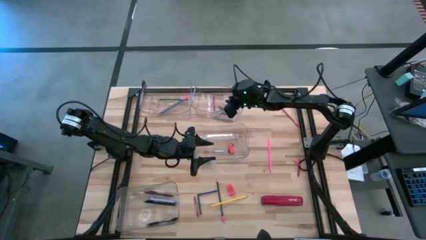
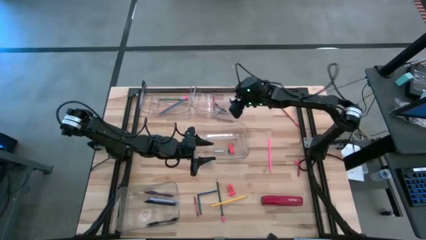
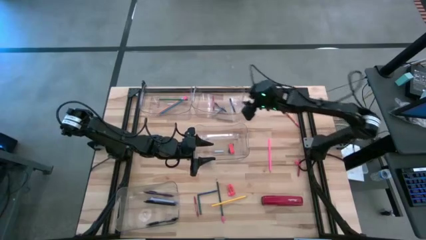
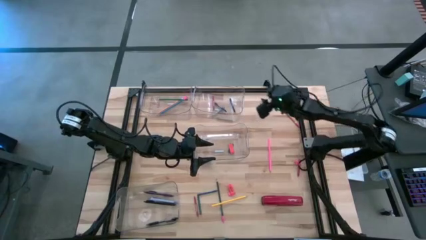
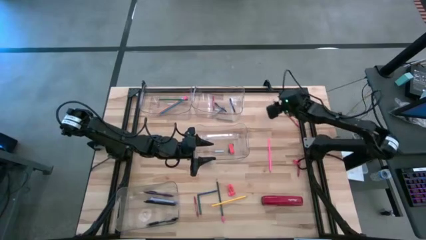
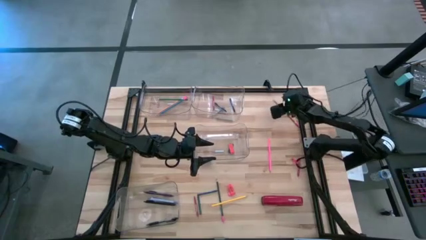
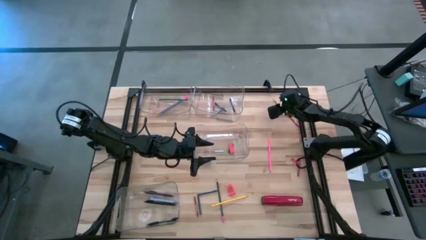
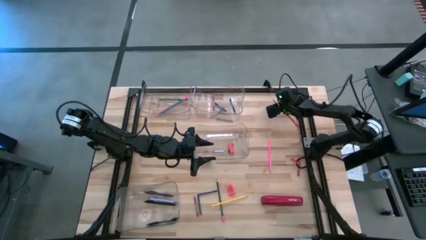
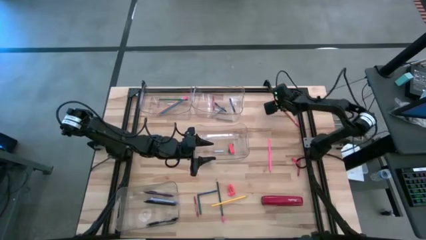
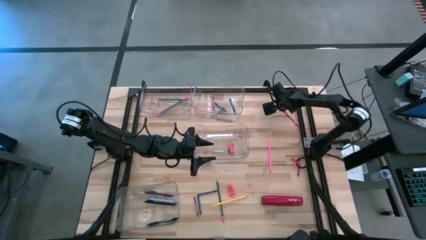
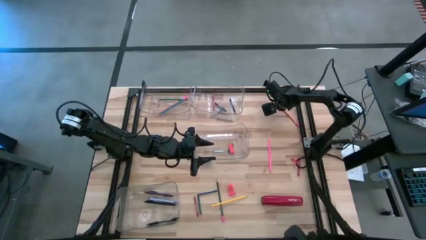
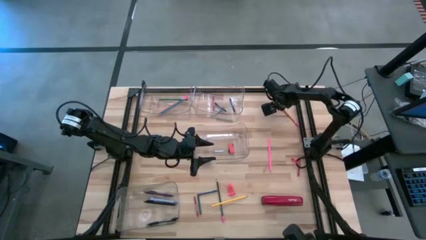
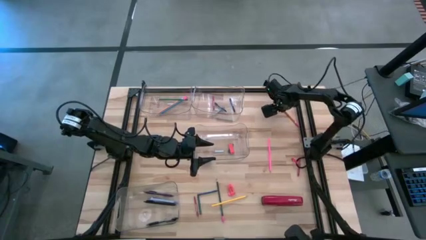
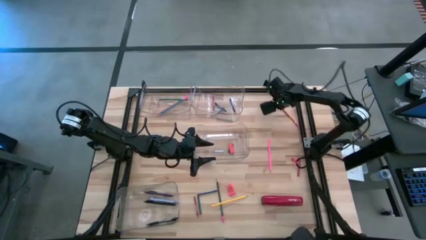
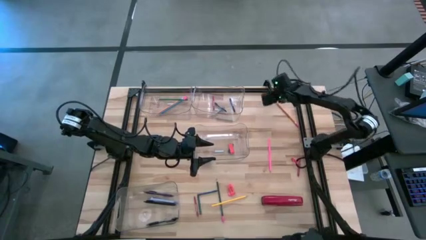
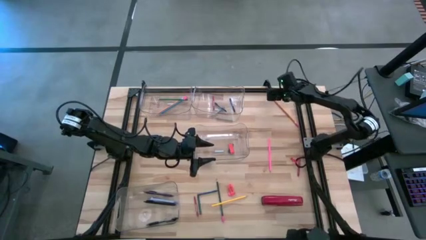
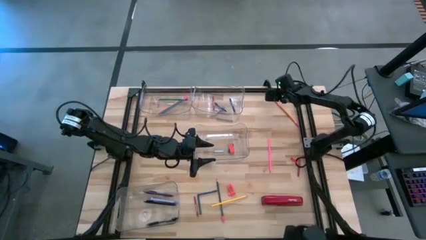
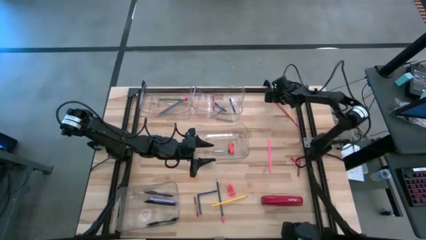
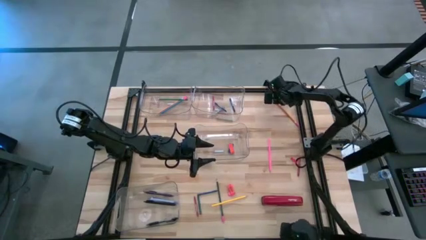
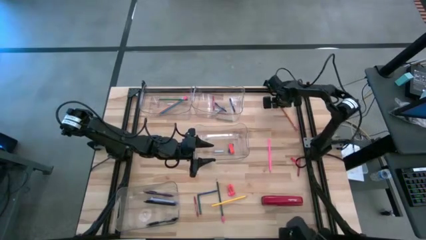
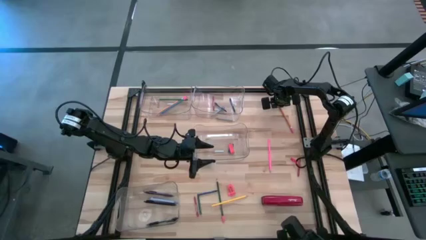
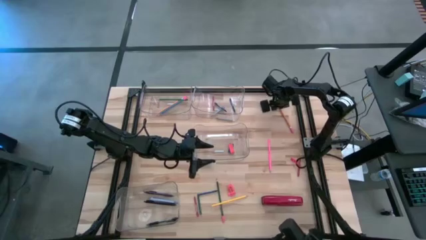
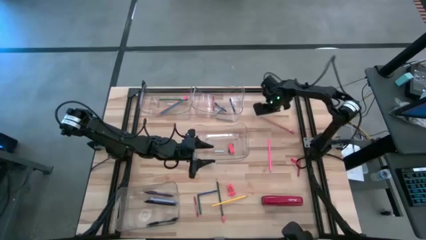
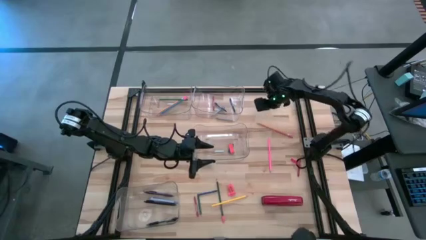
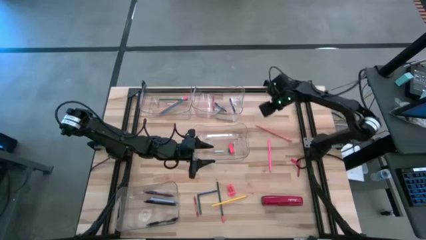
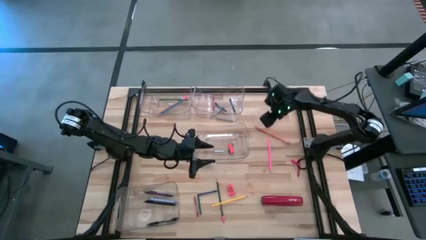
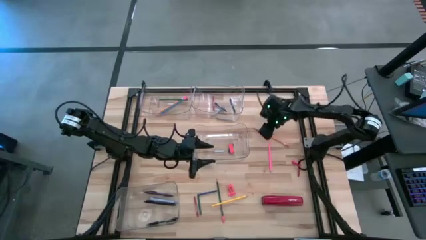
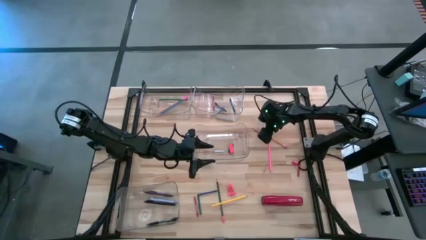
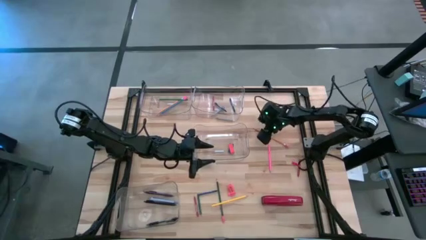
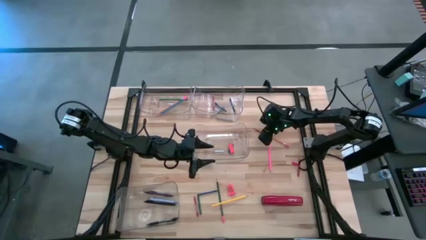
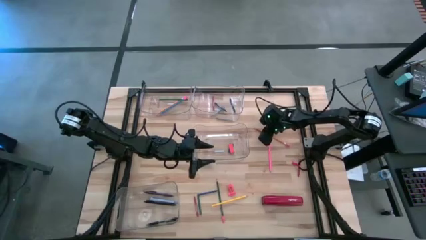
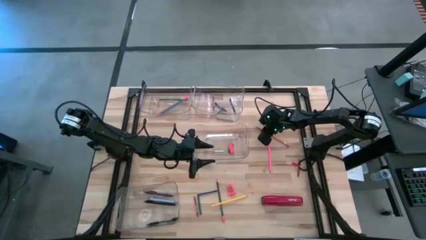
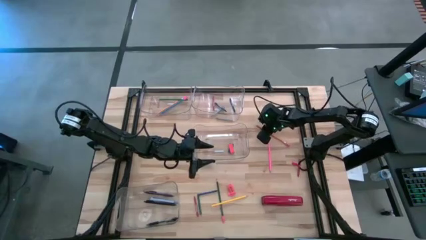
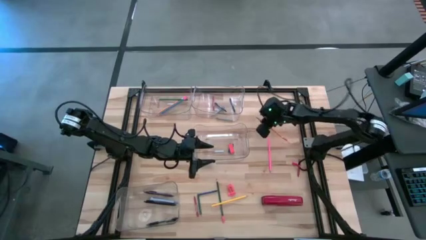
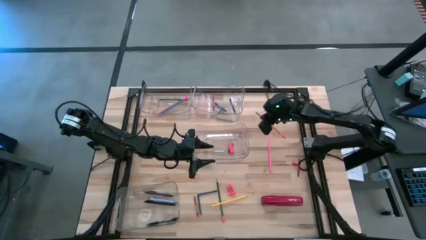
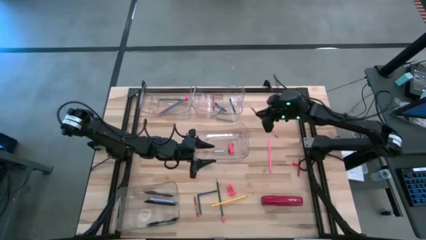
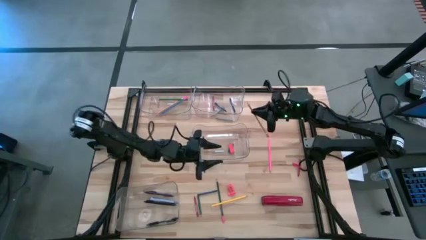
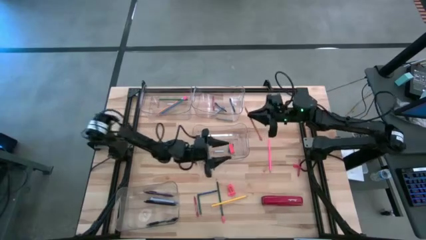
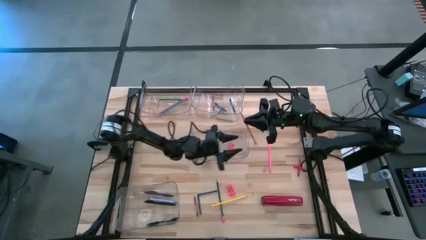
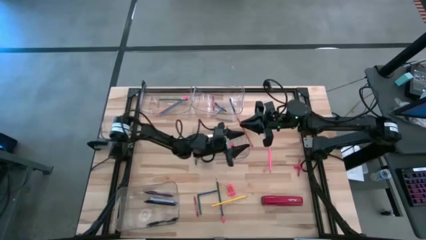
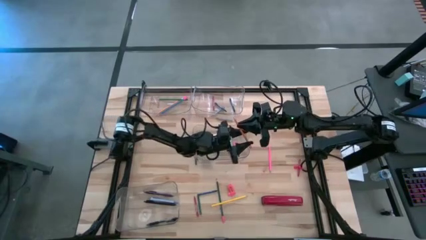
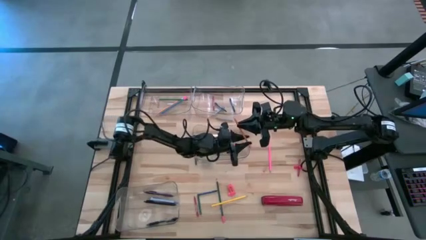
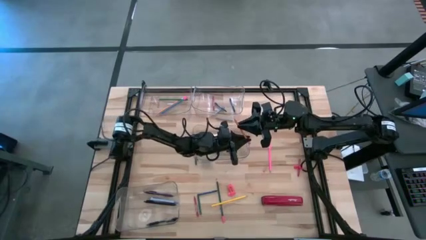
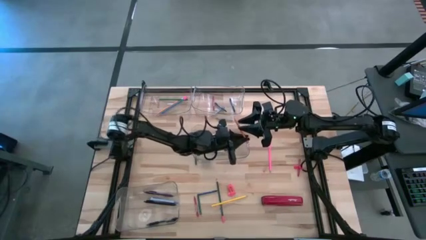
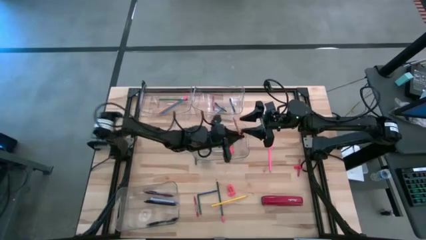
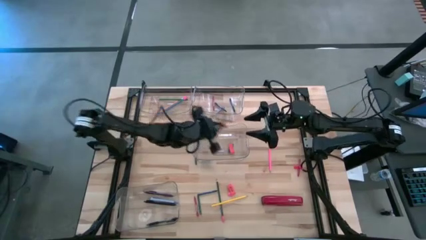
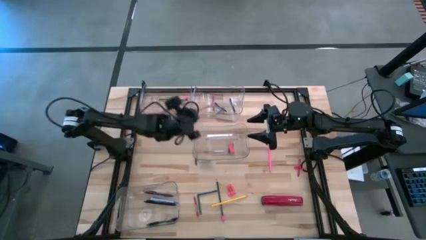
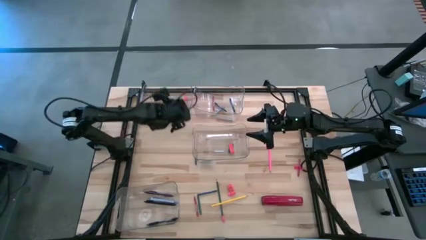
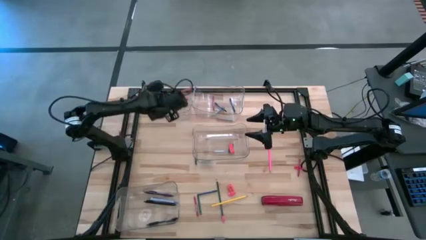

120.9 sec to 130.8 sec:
Task: Sort crayons/erasers/pens/pencils in bins
Put the orange pencil into the top left transparent bin

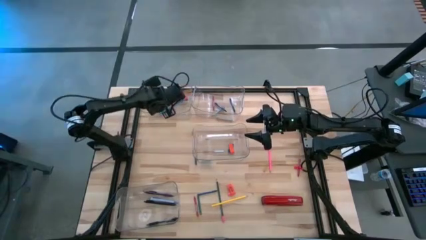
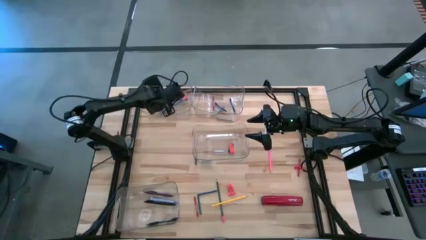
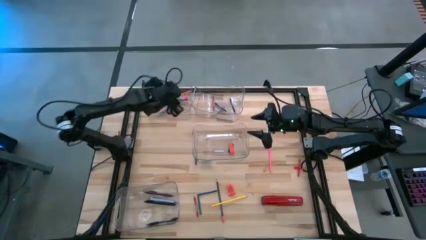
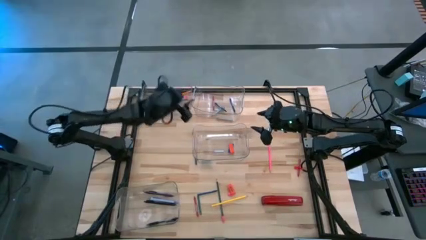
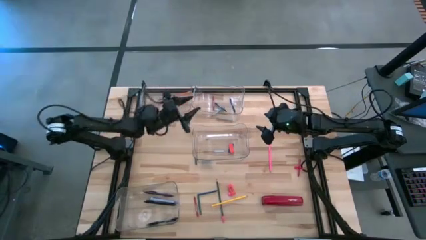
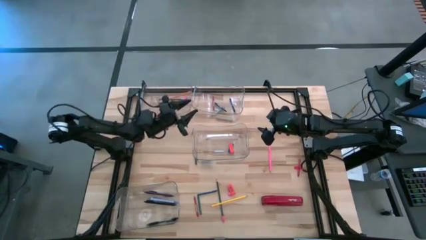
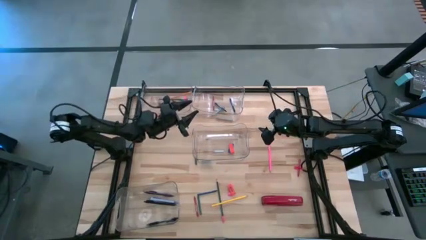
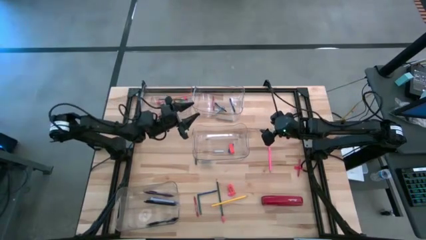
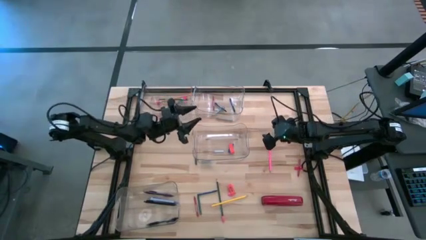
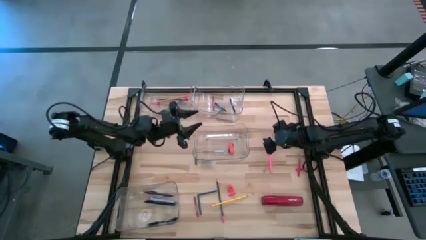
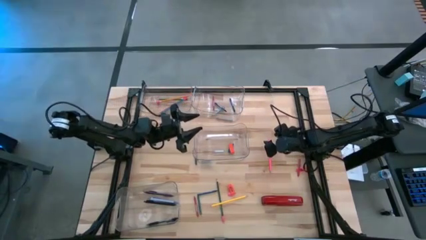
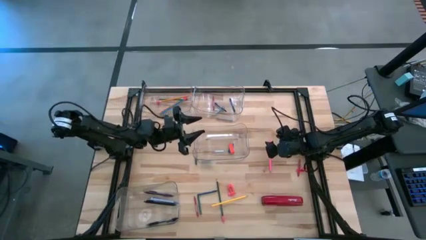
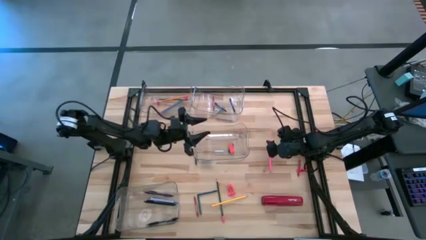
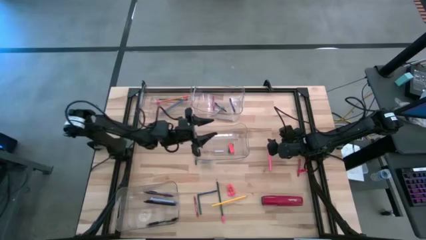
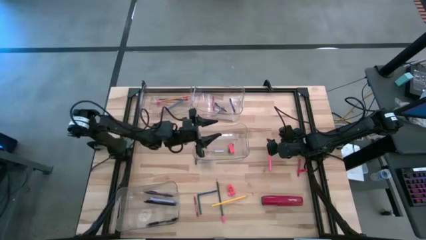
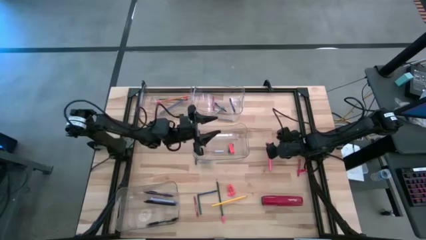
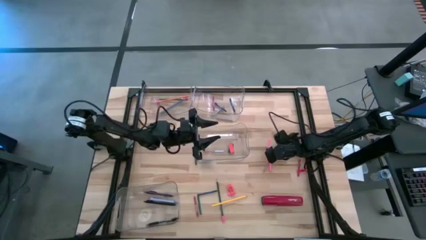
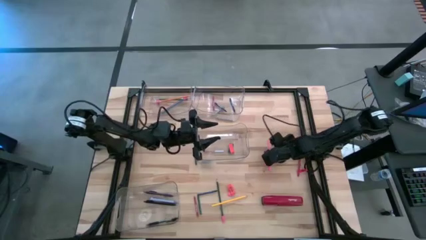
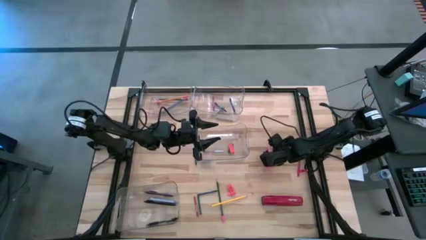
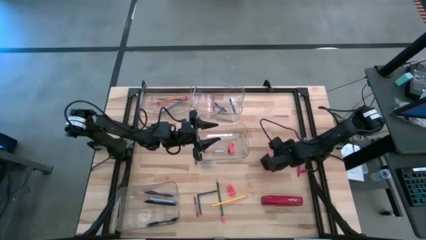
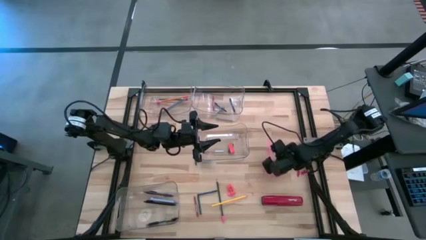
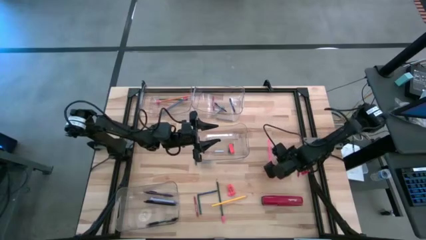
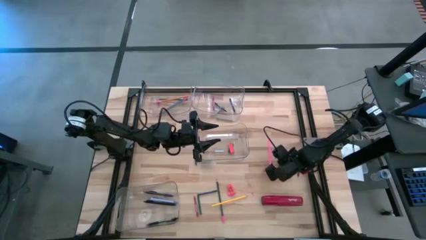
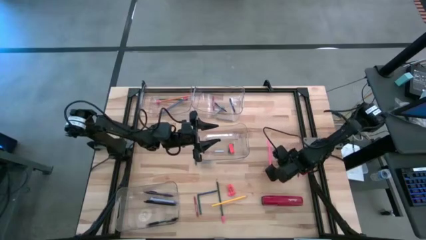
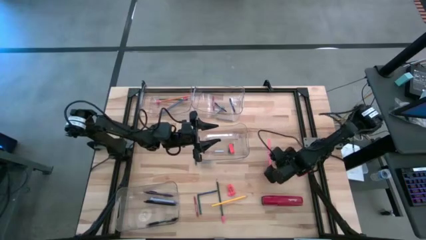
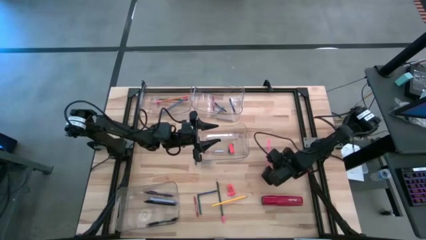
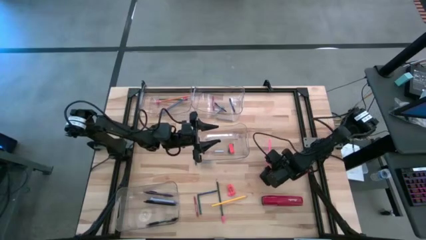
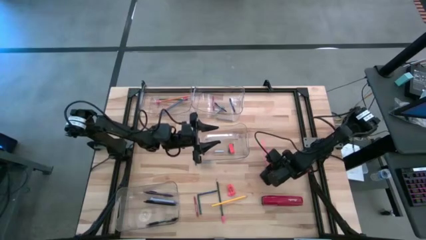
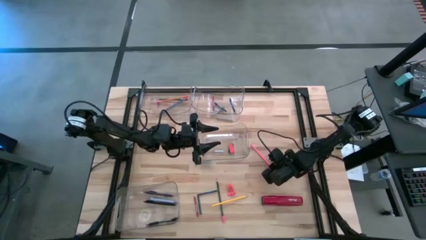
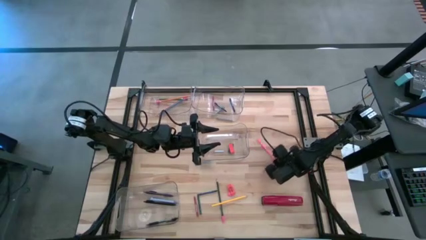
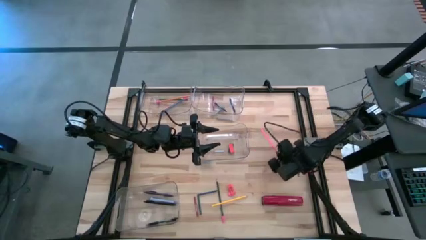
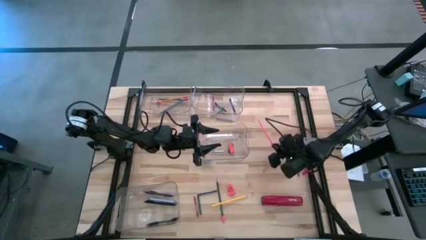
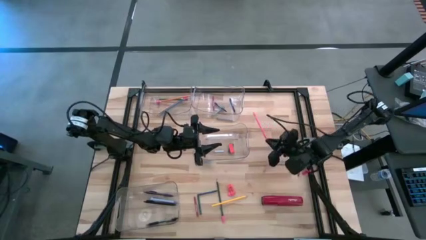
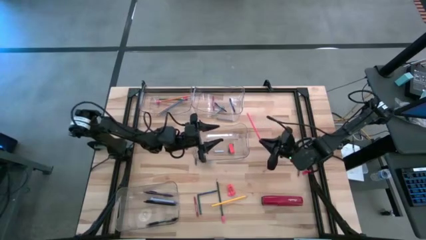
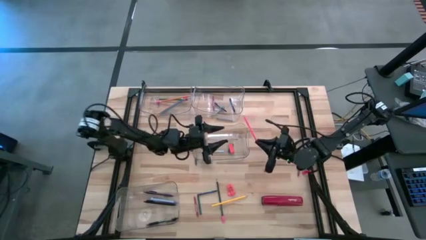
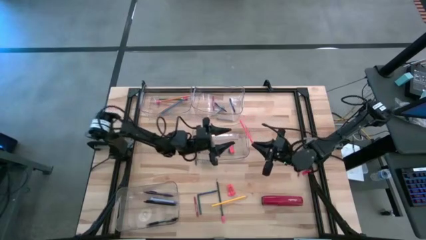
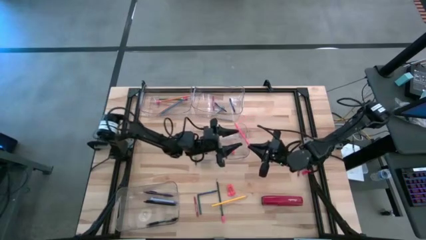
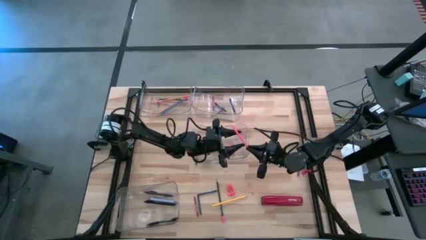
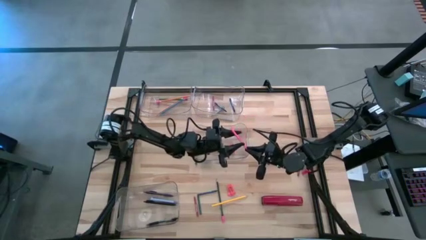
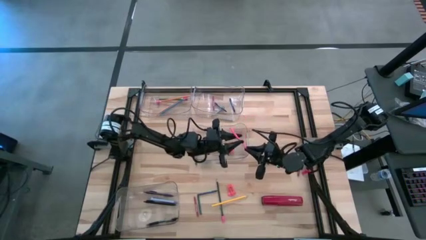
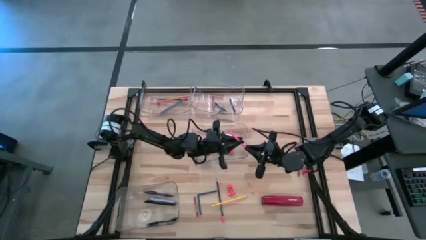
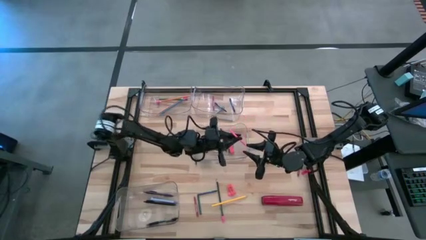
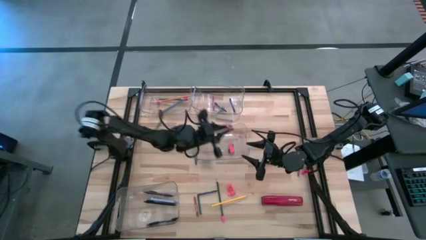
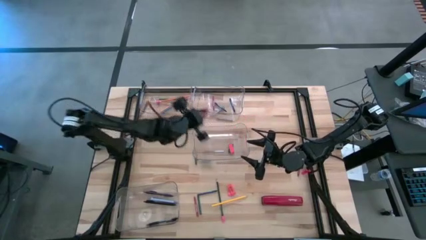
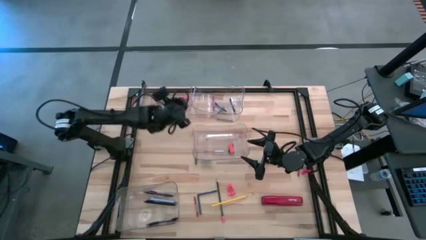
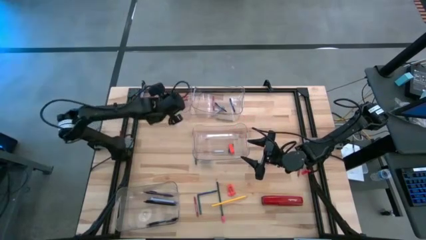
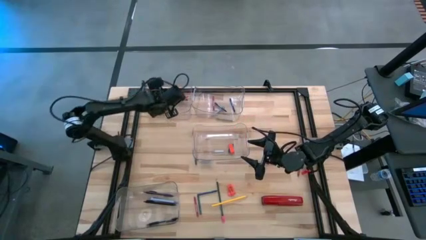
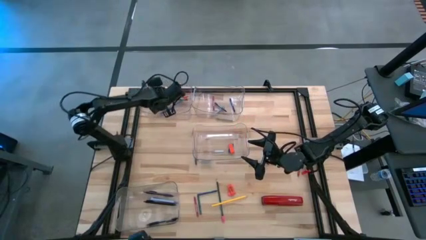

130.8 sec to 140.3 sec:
Put the pink pencil into the top left transparent bin
